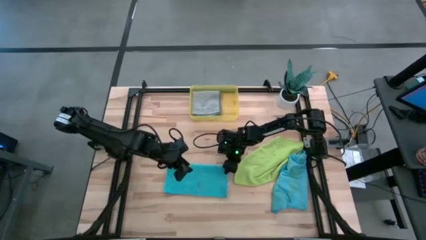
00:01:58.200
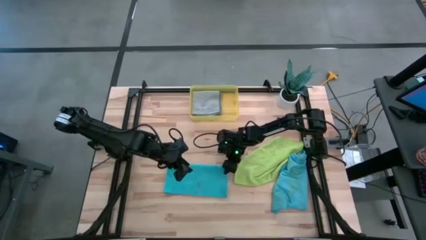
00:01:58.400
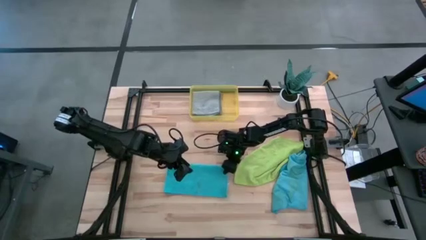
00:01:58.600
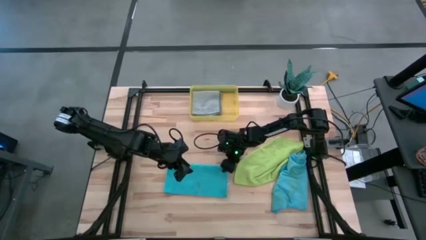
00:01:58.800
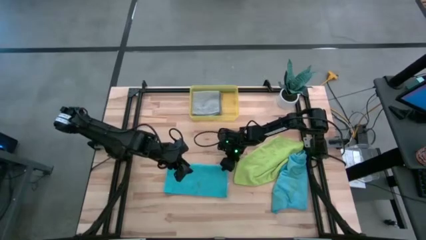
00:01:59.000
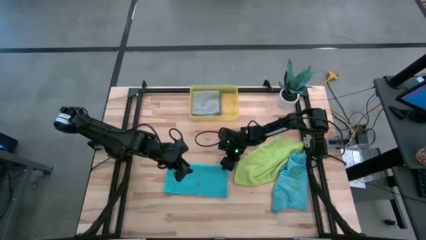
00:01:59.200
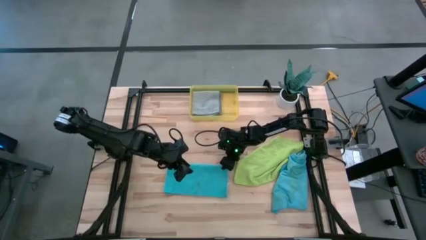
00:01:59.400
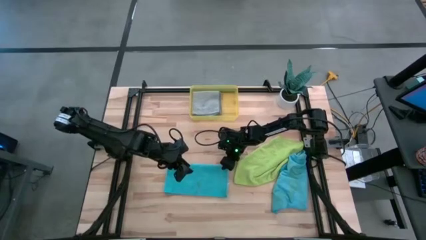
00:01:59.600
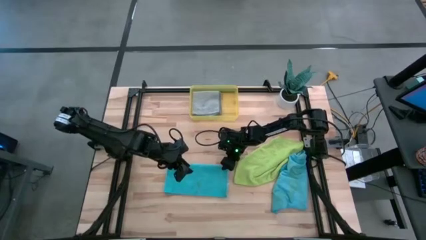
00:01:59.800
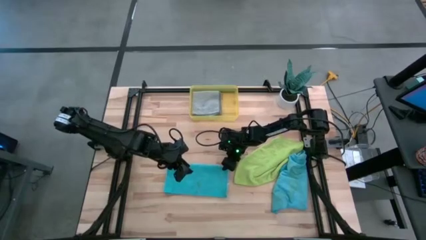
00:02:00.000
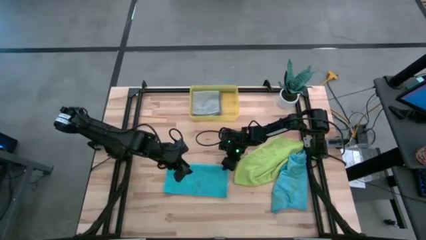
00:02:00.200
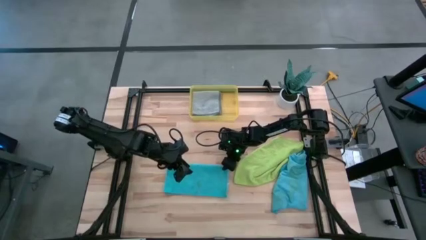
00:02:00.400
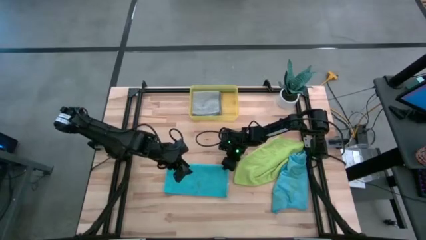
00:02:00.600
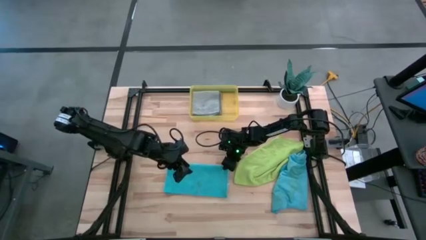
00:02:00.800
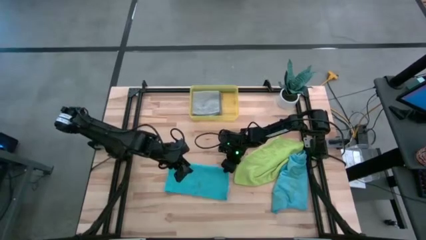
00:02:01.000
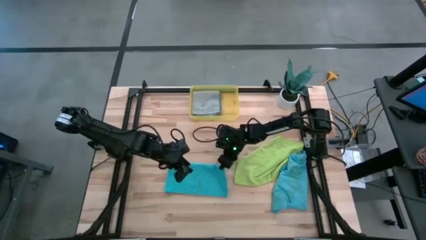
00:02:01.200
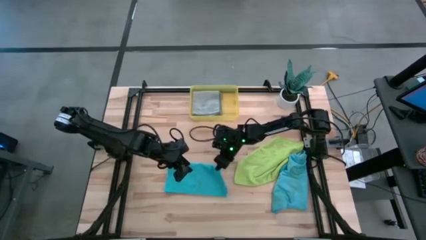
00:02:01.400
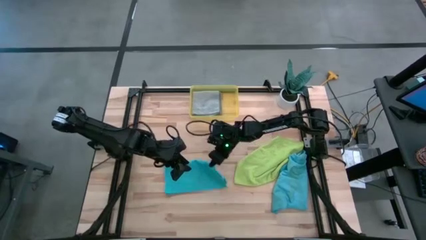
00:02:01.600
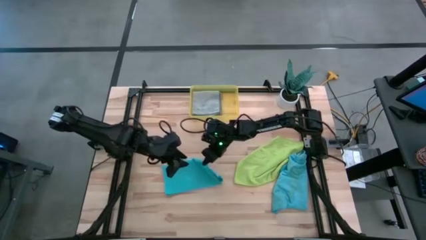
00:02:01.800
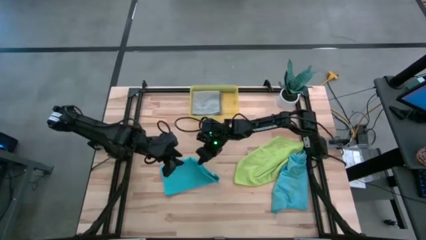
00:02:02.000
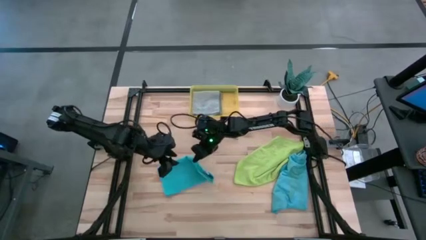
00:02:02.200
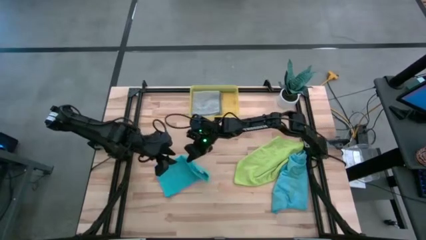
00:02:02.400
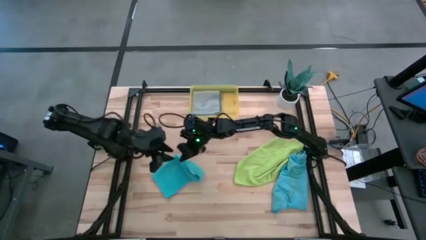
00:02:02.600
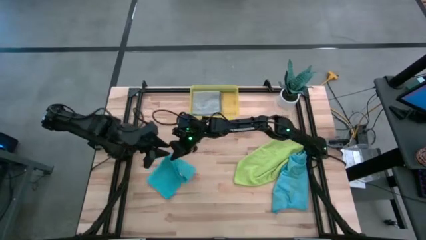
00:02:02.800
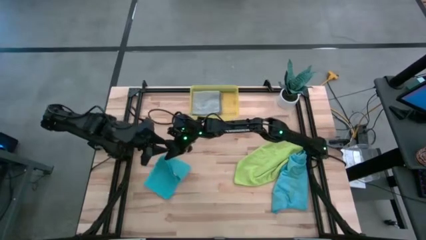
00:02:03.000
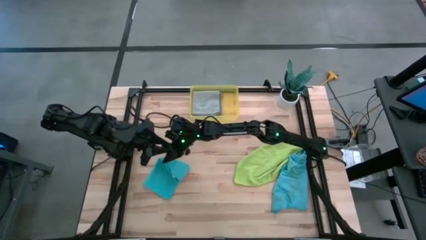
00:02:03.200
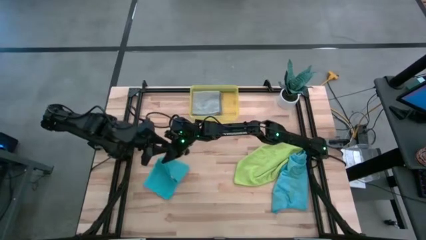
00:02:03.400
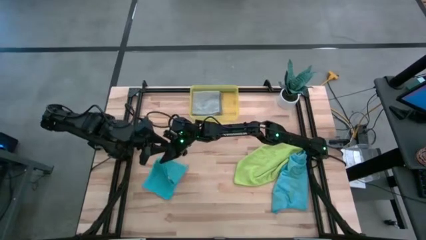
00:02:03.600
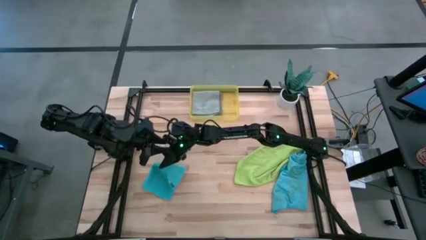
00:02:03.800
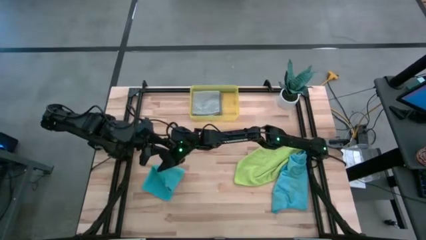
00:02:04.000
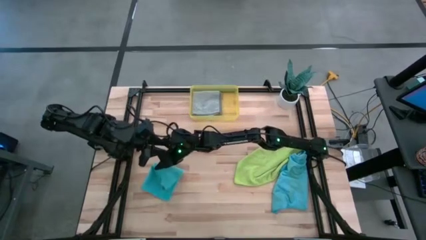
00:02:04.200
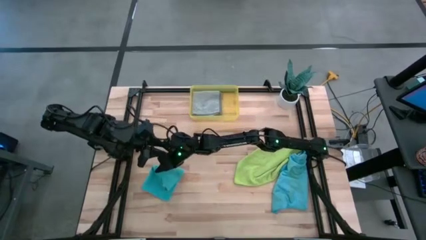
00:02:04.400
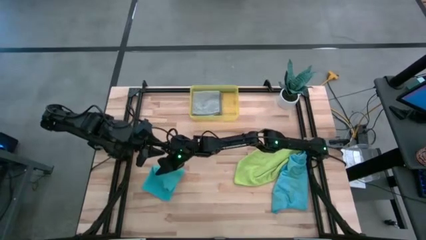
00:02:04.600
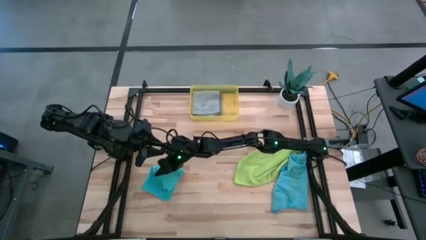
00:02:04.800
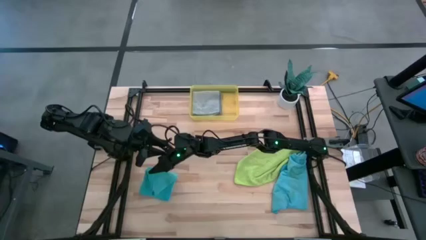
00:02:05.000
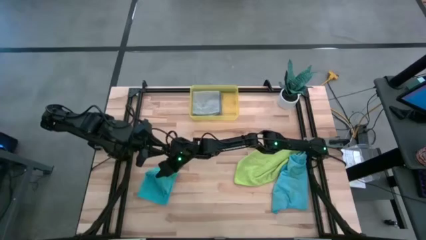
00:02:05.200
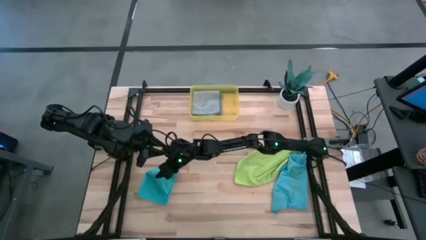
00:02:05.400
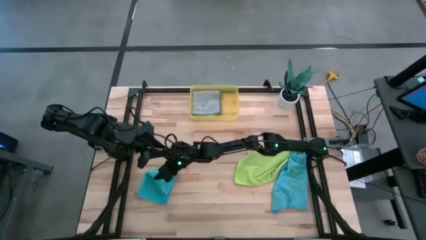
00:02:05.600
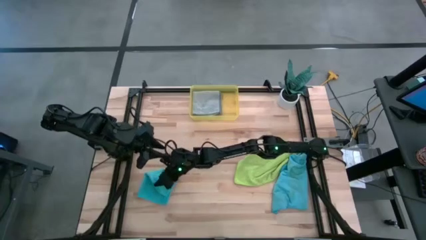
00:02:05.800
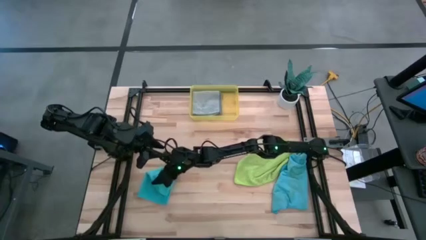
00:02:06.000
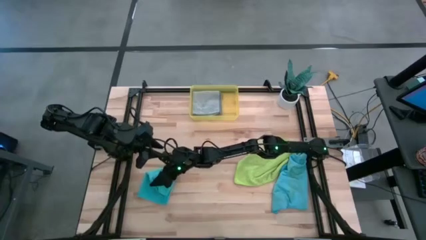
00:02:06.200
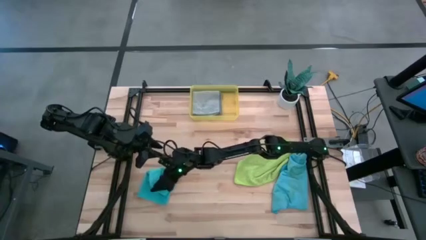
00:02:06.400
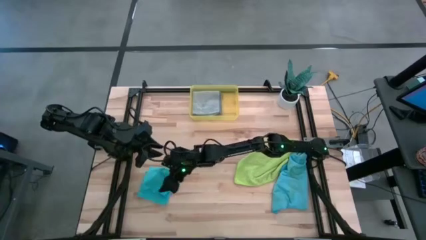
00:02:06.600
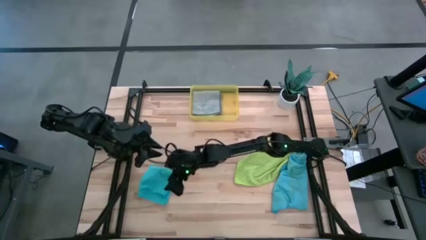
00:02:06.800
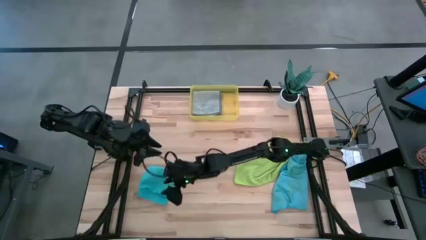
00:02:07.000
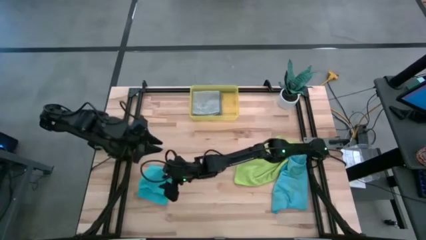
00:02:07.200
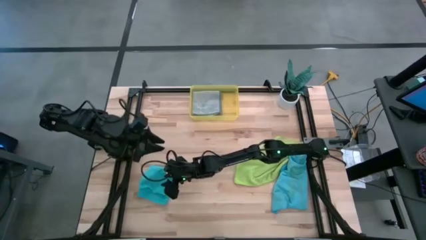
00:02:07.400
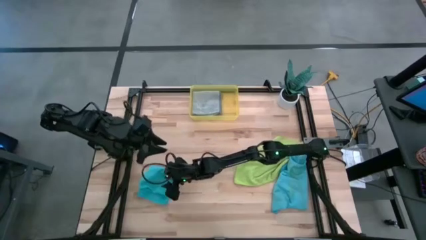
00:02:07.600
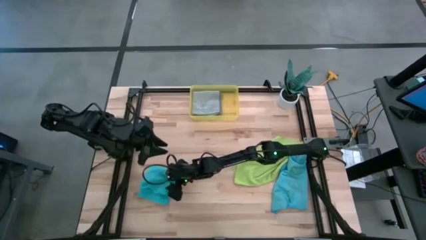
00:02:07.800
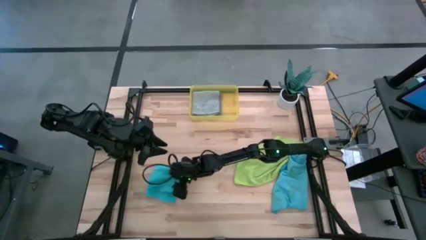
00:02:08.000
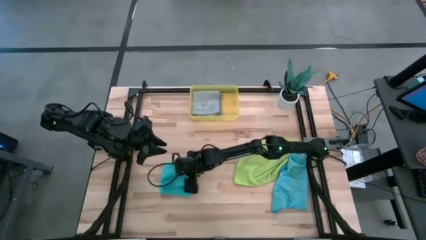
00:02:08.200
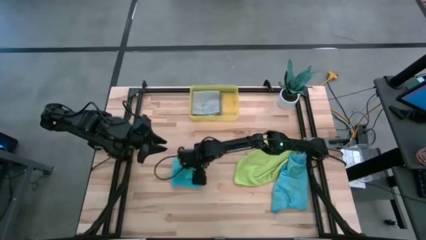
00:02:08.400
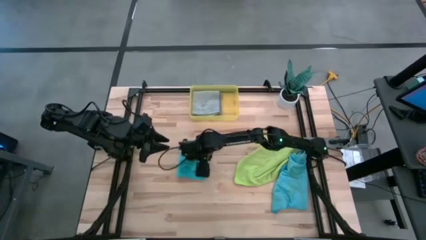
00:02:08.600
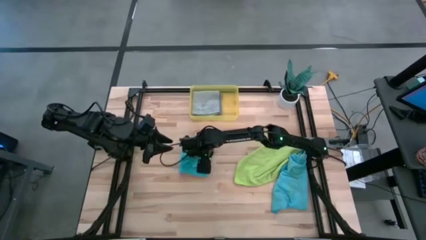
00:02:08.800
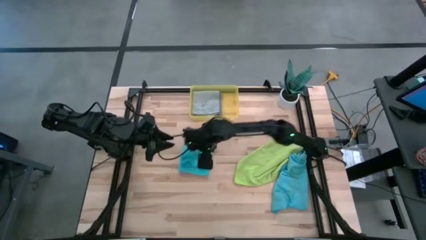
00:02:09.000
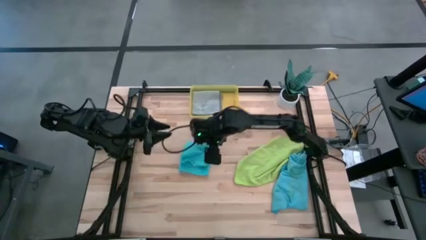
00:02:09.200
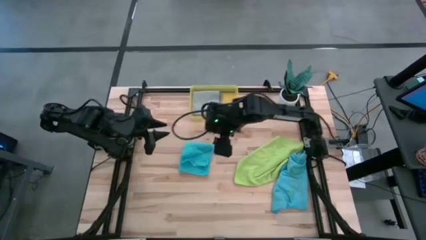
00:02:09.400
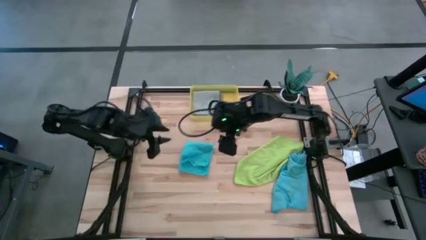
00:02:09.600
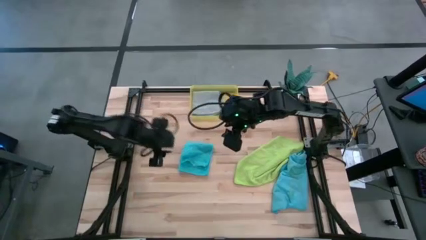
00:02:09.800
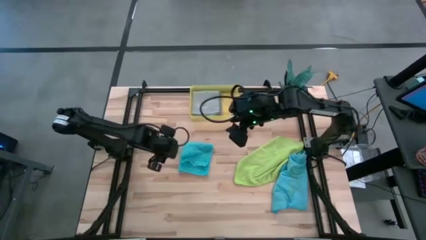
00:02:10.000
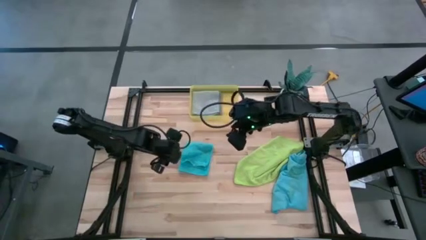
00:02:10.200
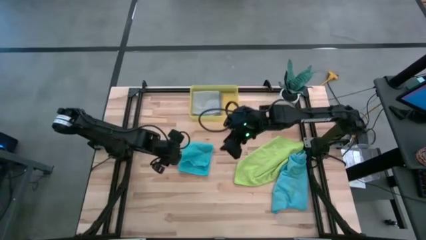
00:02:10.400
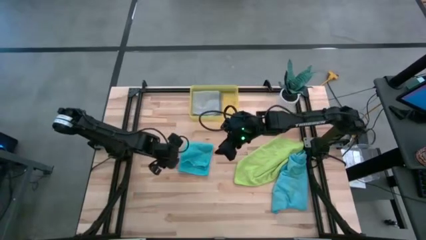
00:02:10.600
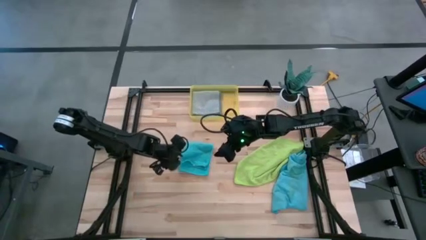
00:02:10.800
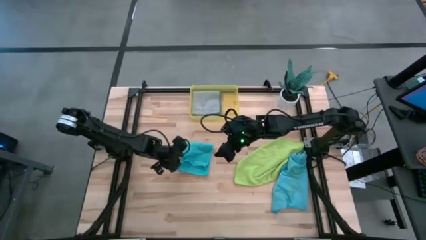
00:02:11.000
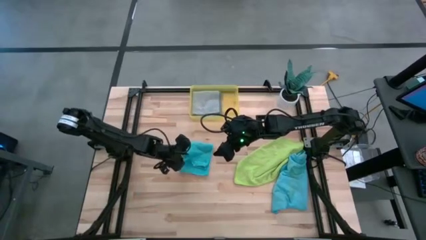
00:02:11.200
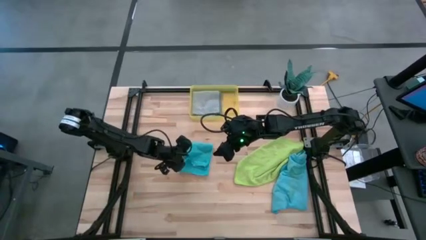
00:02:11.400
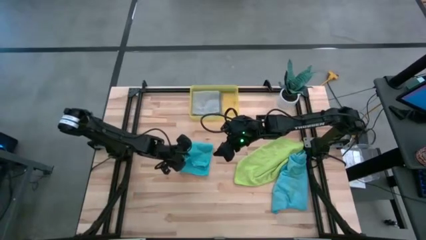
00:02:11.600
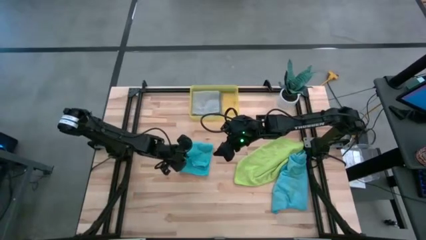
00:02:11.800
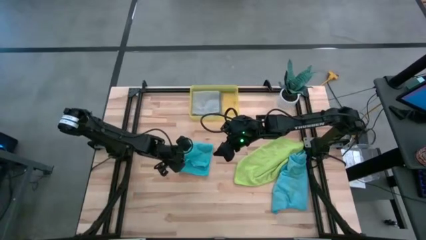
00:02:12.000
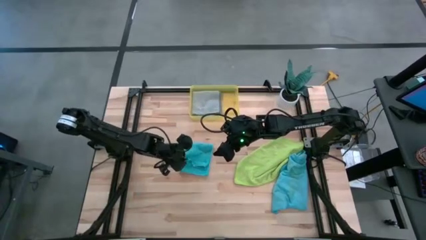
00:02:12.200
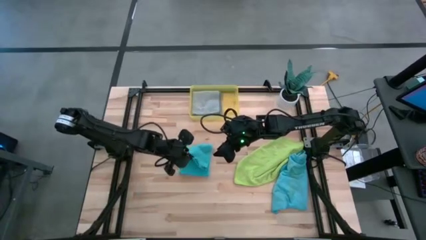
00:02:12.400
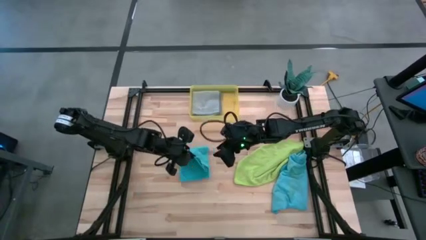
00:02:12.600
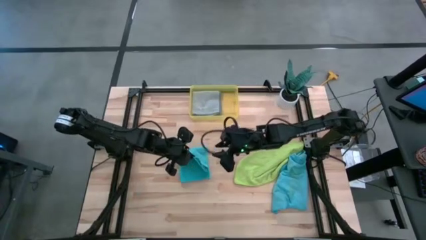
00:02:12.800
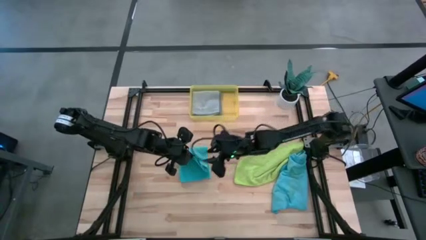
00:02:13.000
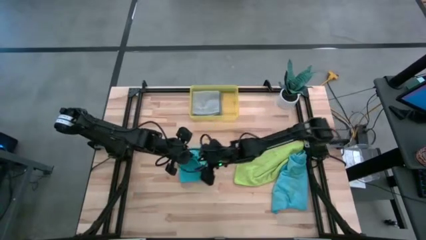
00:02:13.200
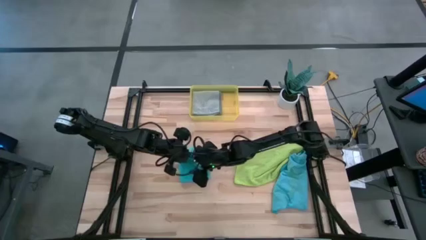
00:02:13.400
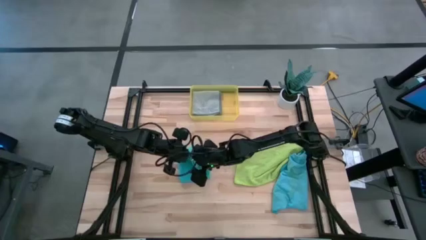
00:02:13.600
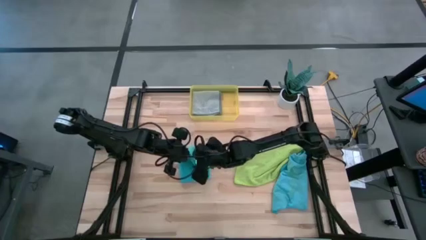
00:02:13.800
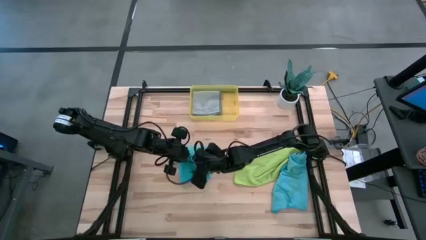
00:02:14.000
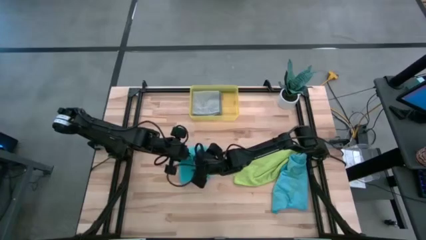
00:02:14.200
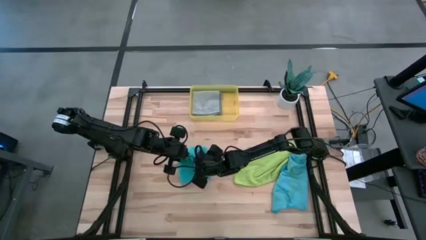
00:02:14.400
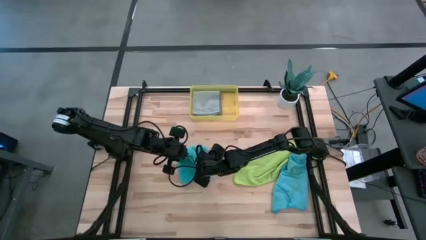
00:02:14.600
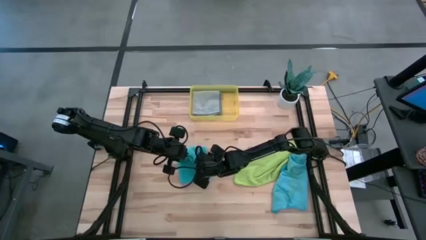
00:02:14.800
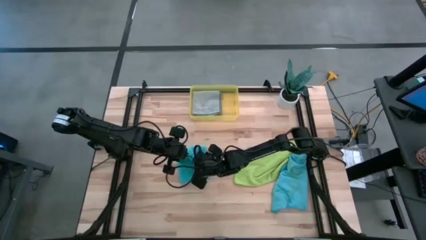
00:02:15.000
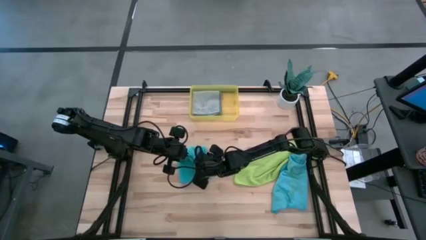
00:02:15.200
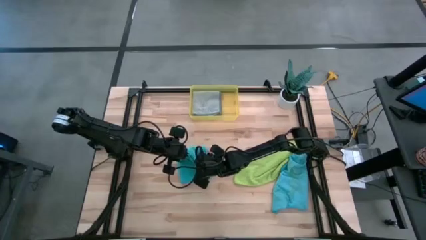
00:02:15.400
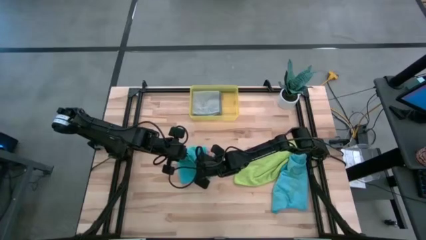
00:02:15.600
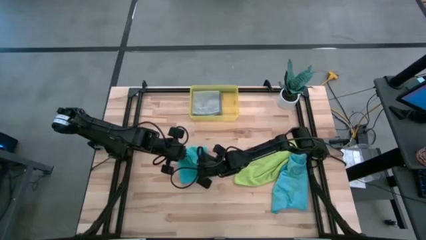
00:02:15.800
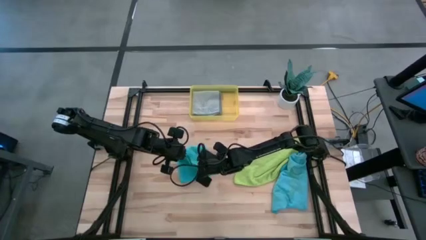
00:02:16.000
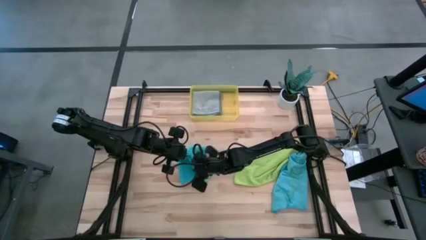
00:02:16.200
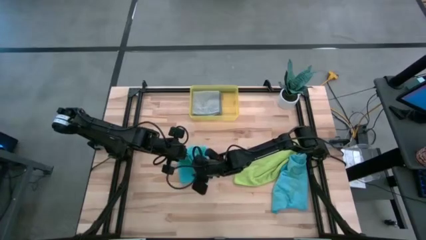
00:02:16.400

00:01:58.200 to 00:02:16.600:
Task: Fold microfiber towels
Fold the blue microfiber cloth
